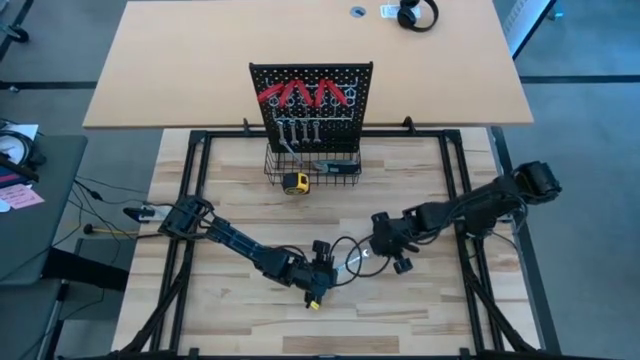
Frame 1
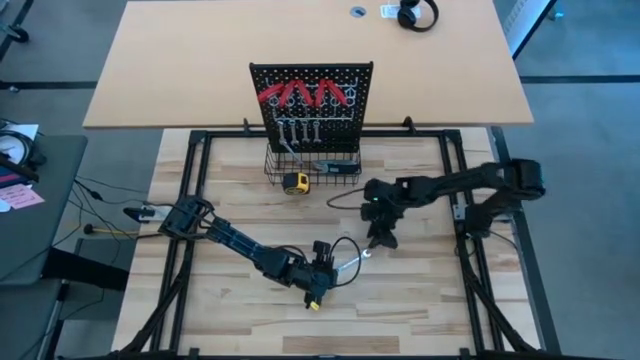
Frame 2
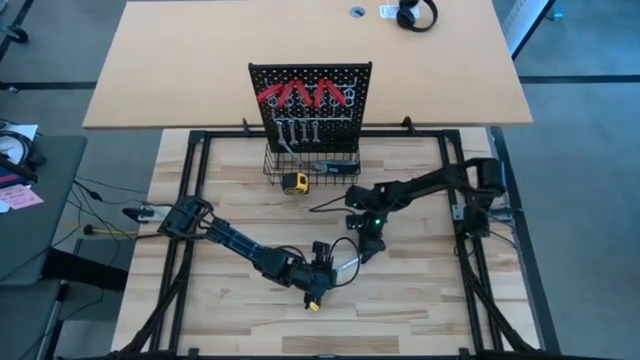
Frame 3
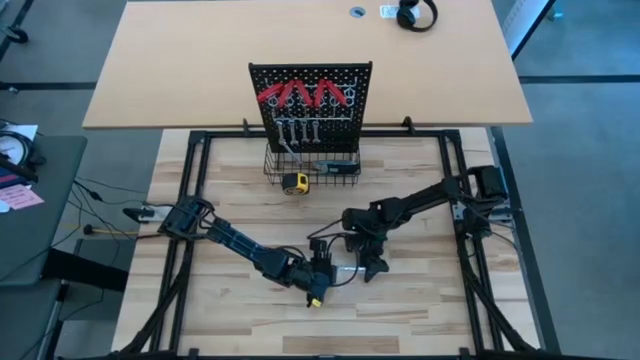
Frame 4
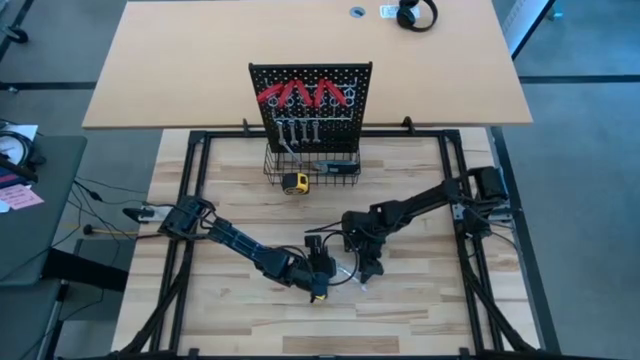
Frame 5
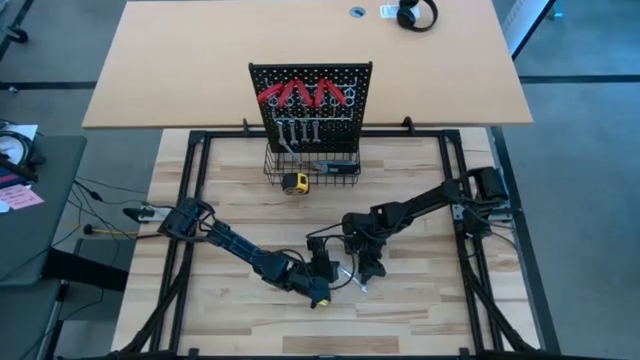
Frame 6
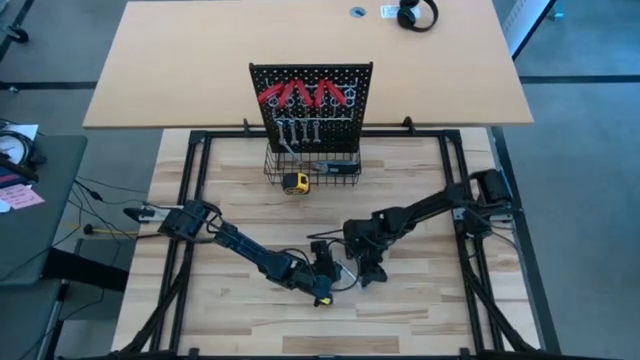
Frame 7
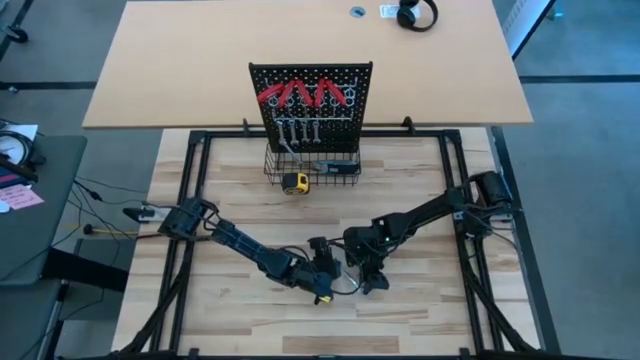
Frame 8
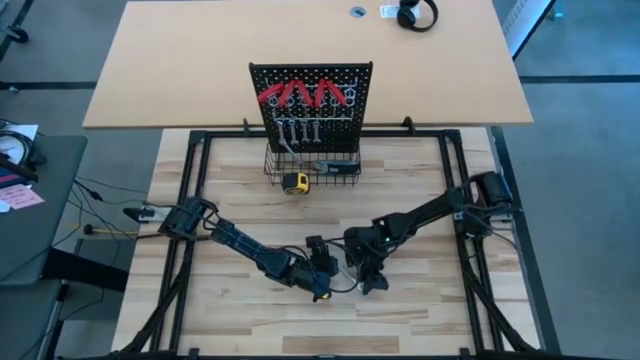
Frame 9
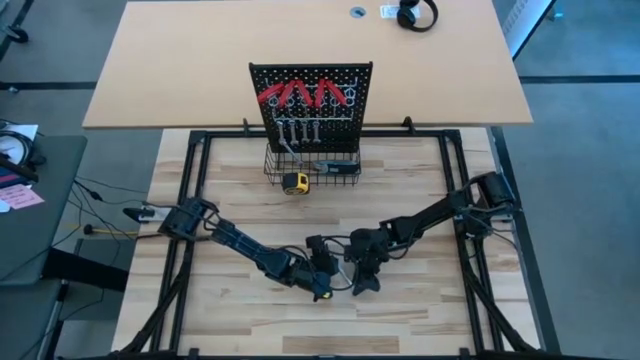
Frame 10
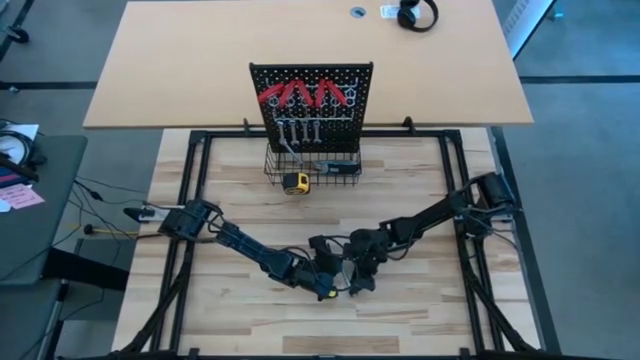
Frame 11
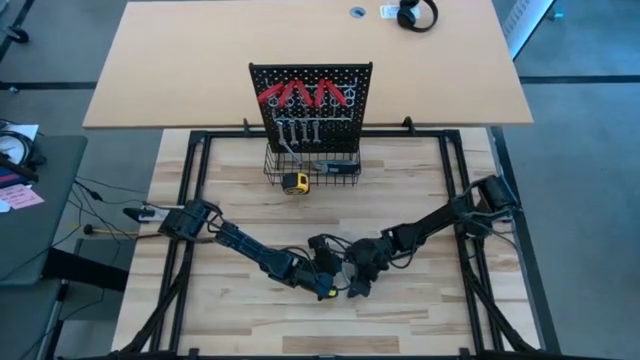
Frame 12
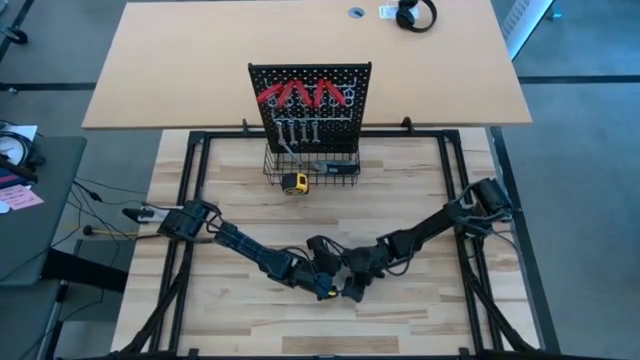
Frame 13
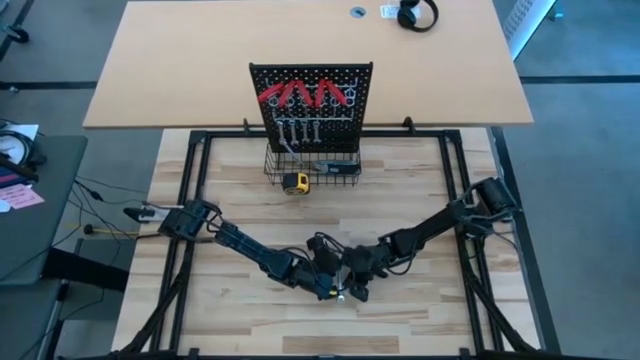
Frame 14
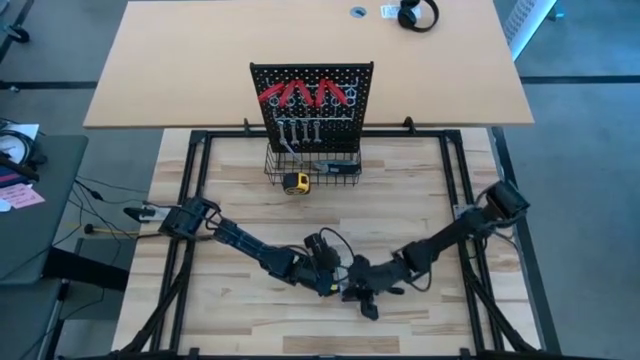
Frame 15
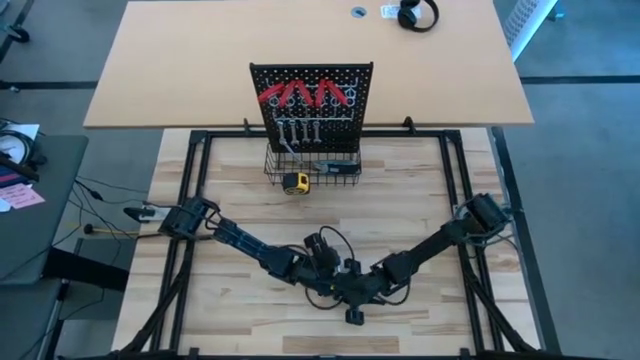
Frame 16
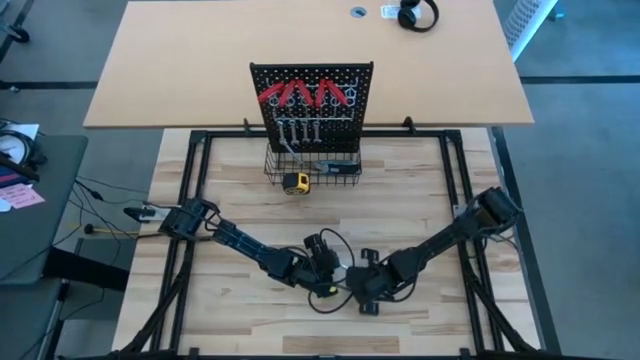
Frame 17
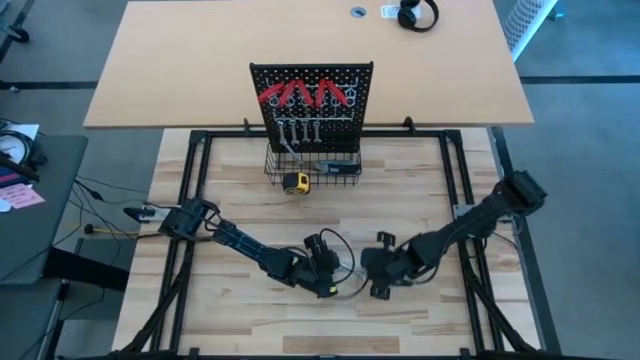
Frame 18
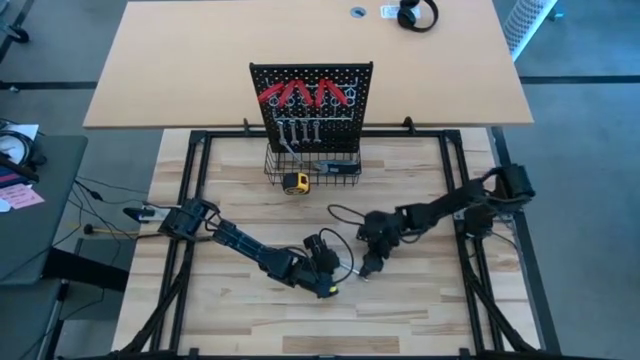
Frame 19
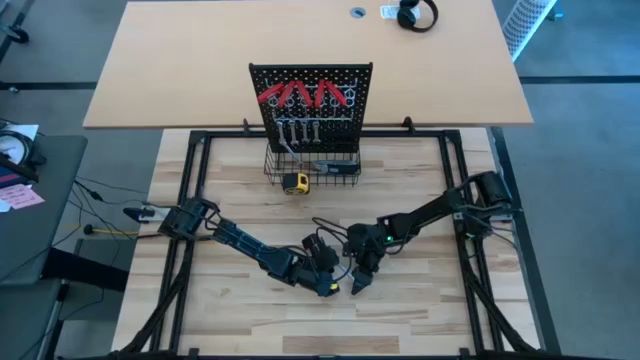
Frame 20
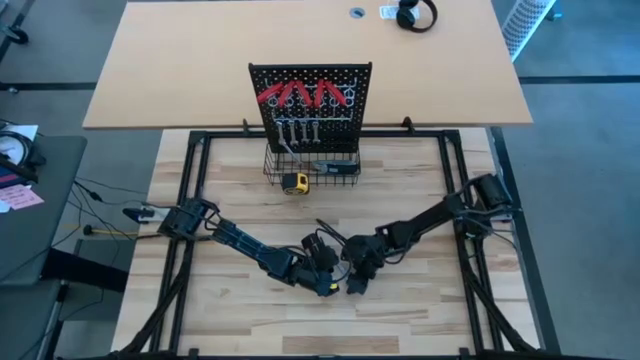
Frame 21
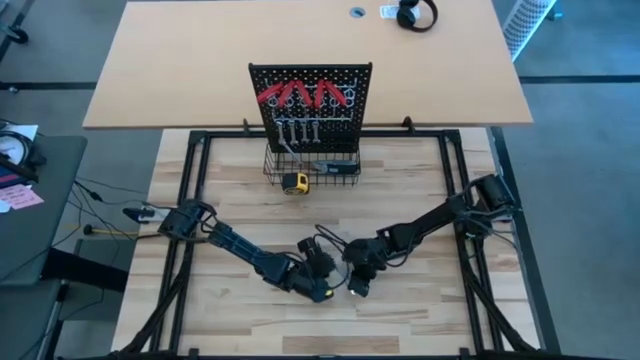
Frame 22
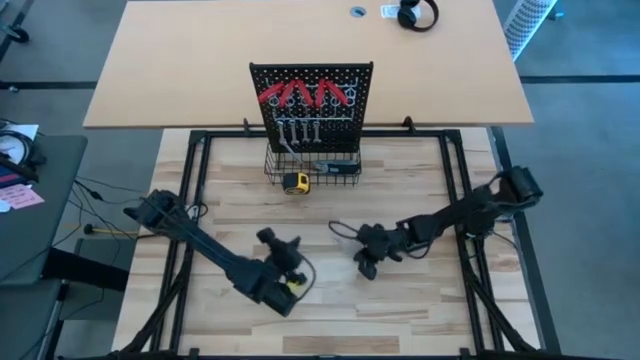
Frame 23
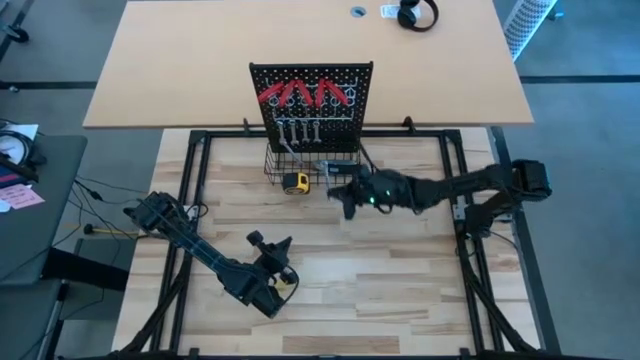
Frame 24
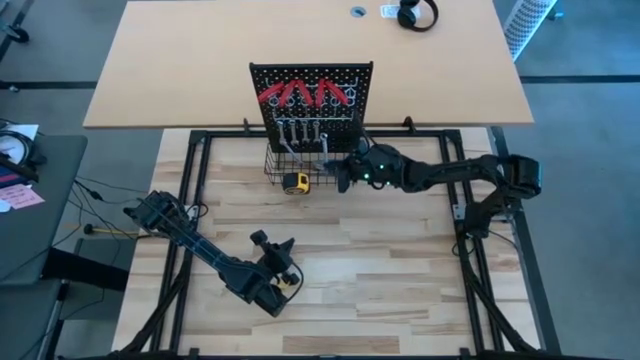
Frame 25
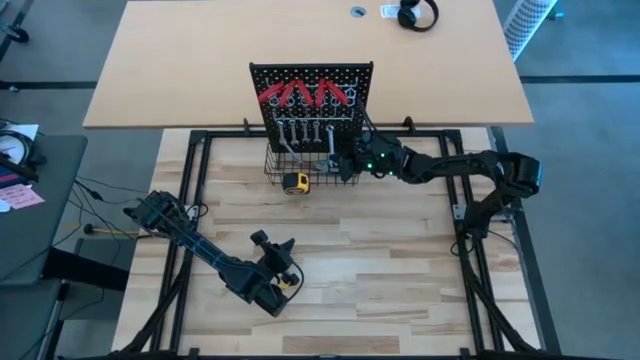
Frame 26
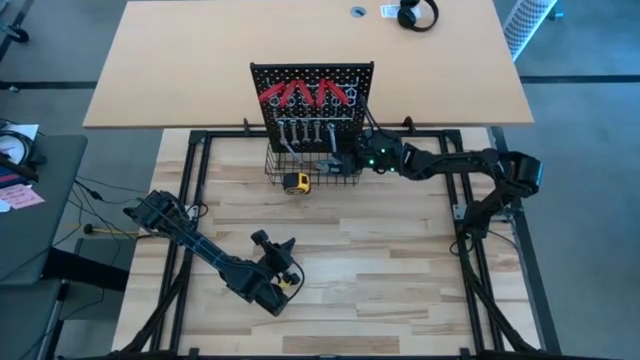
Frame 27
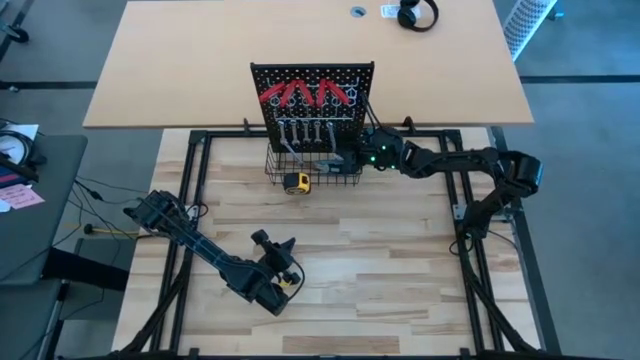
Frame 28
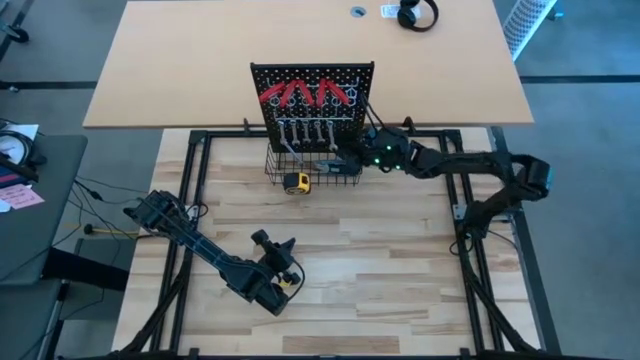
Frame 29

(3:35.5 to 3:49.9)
Task: Hang tools onto peg board
Hang the wrench into the pegboard

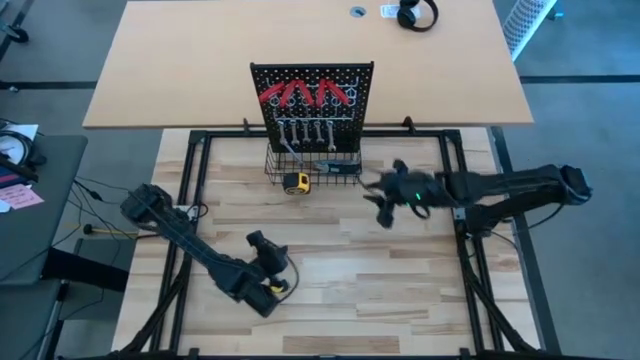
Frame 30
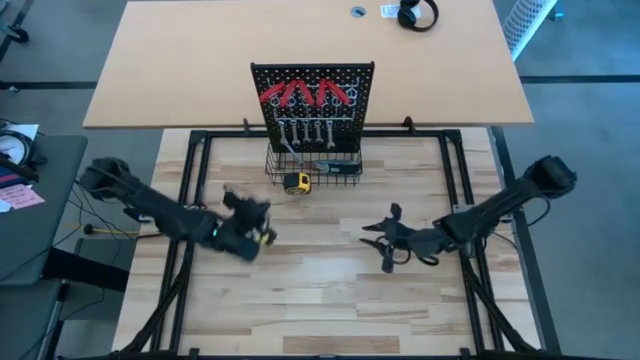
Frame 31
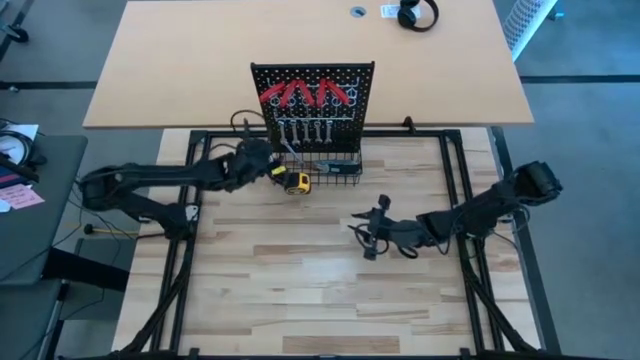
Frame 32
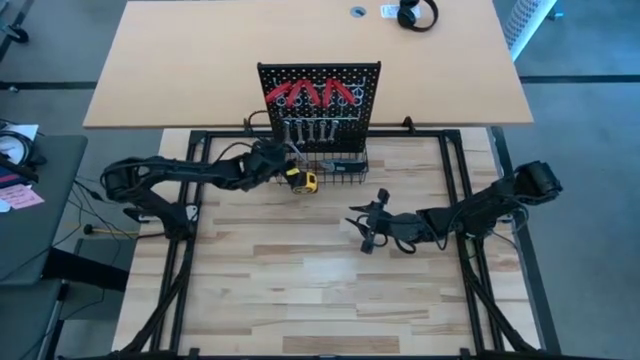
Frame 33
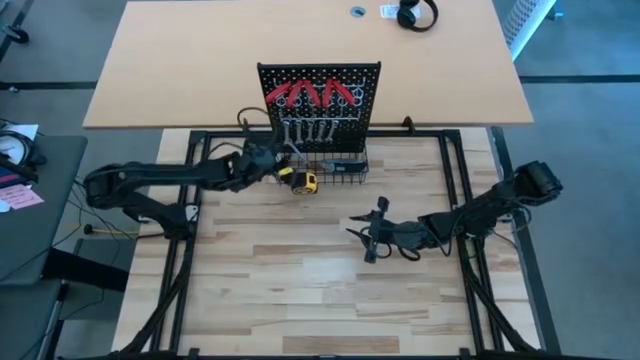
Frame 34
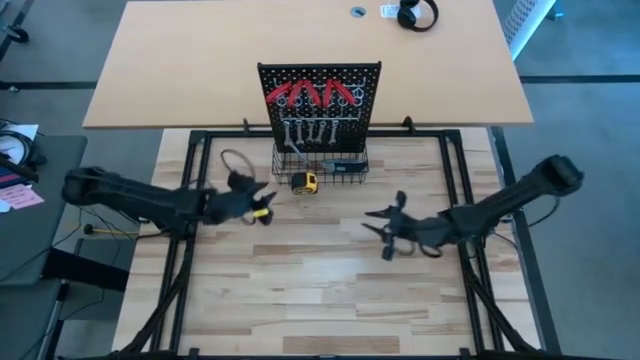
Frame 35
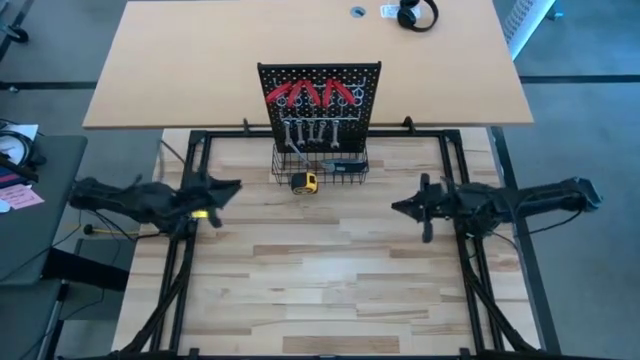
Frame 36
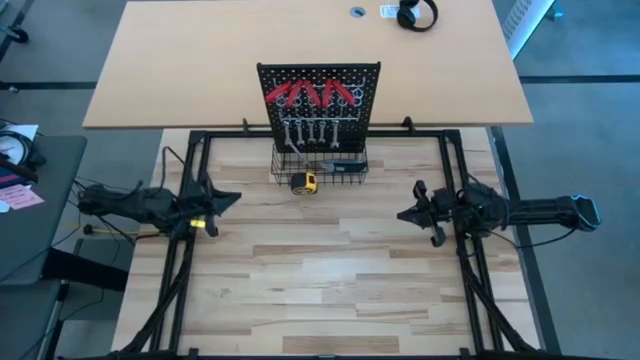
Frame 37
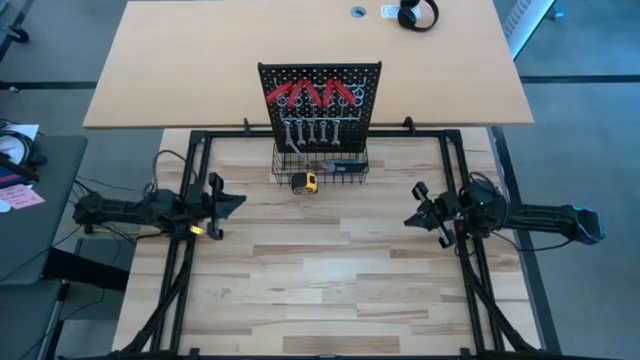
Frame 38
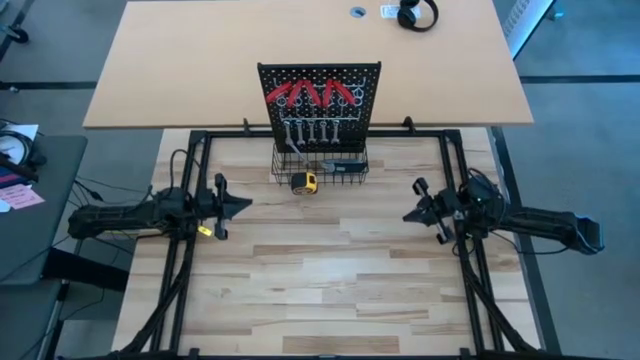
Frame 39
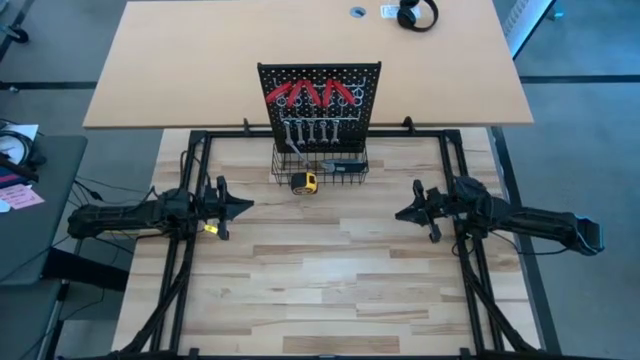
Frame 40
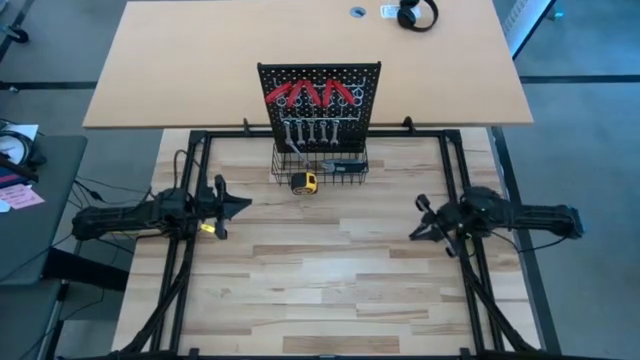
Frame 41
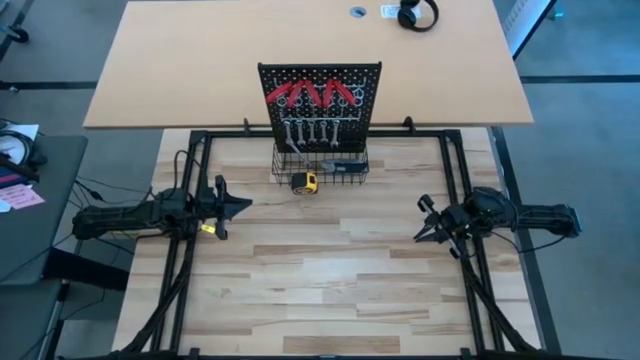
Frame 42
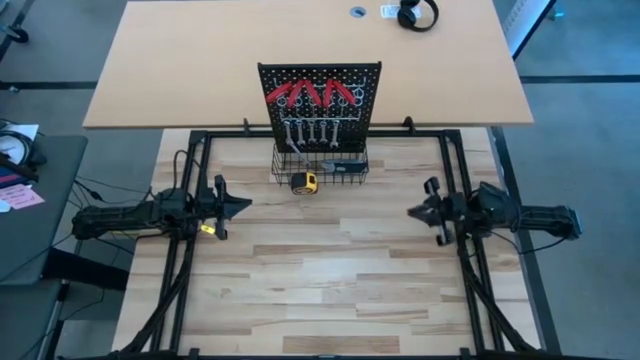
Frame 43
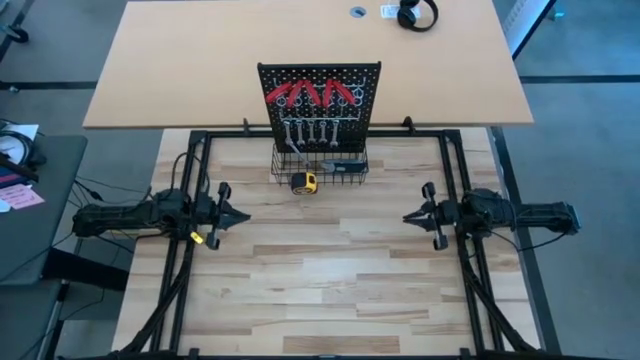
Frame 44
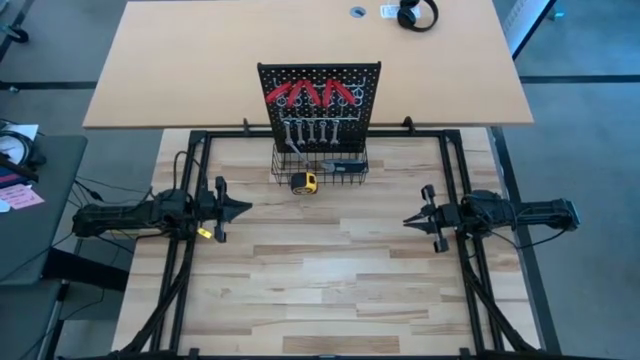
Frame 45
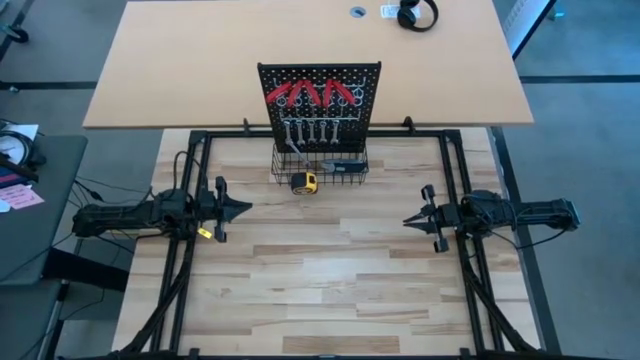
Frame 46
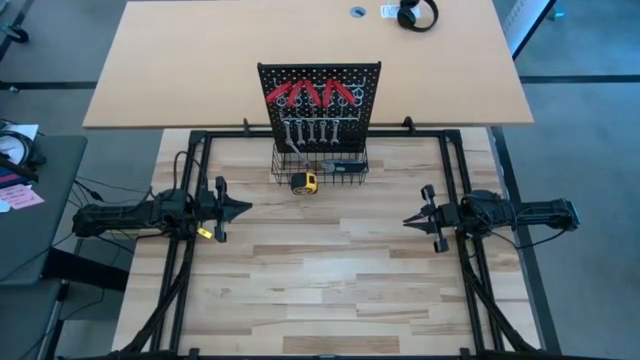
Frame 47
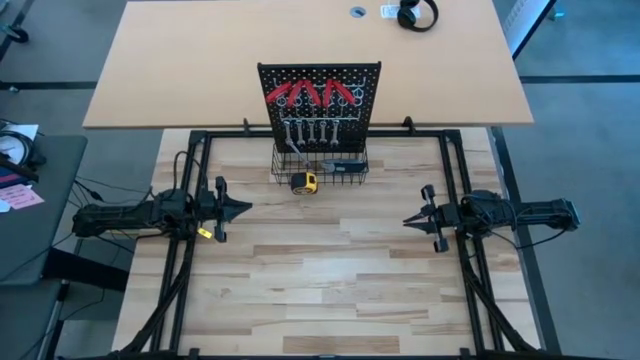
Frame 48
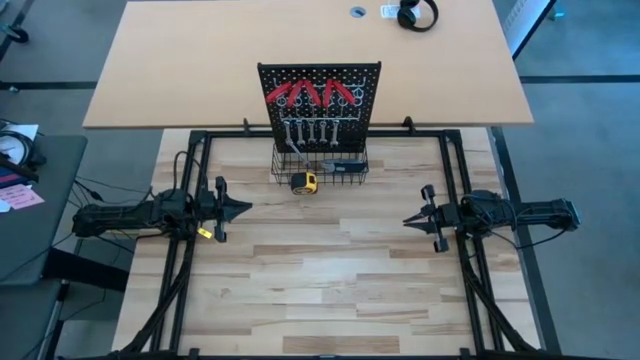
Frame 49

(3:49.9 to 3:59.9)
Return to Home Position
